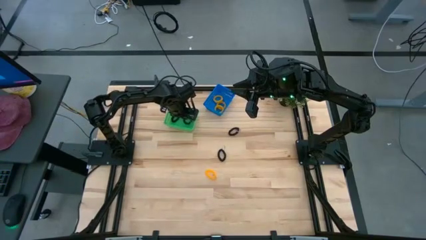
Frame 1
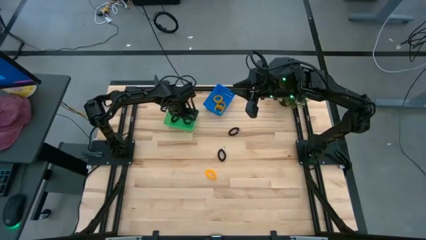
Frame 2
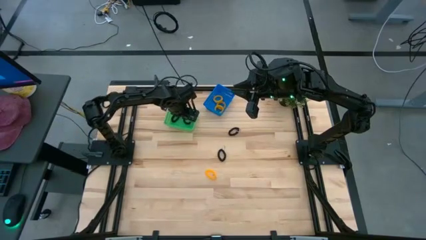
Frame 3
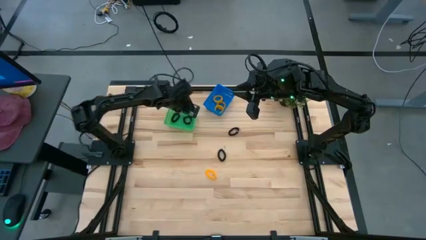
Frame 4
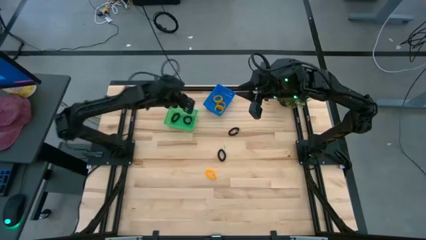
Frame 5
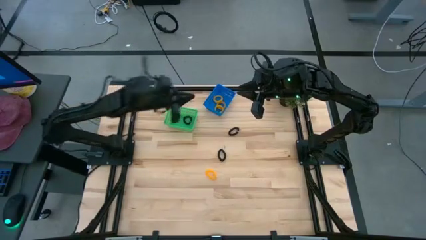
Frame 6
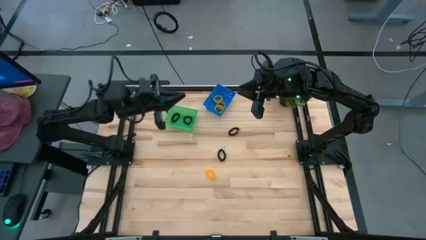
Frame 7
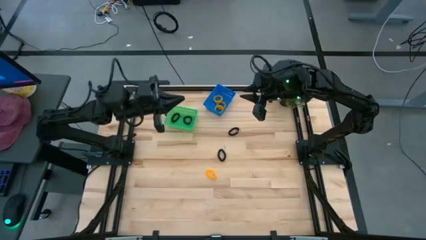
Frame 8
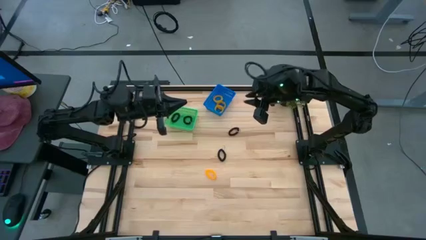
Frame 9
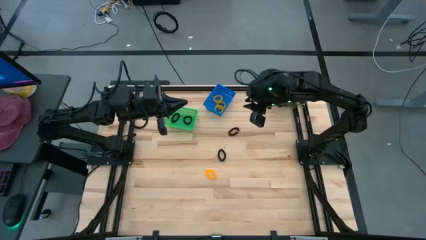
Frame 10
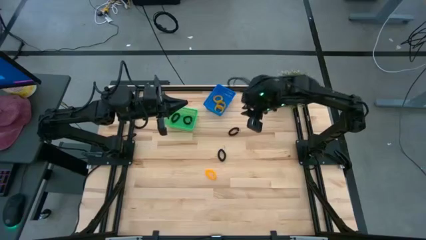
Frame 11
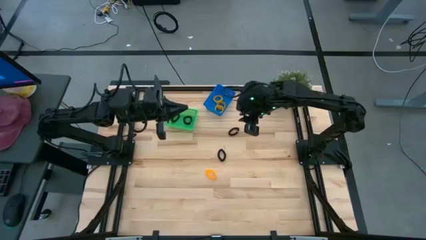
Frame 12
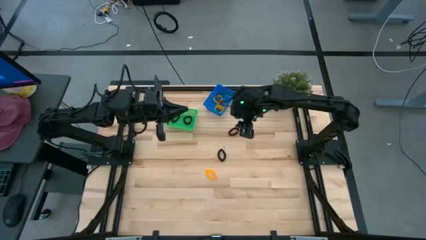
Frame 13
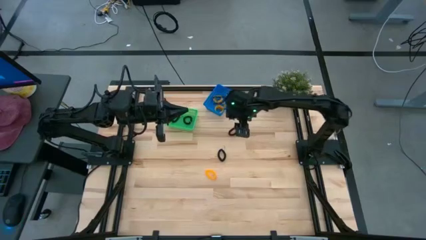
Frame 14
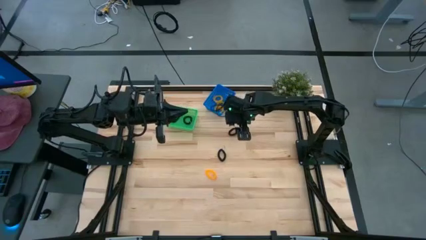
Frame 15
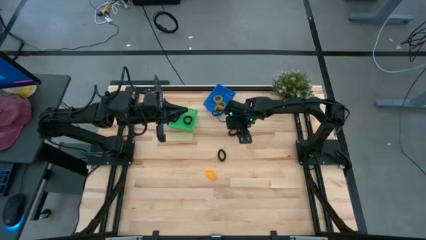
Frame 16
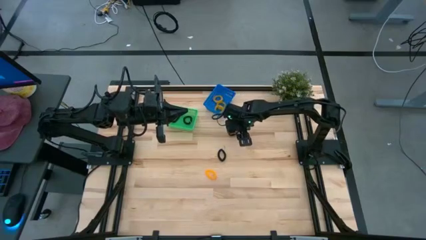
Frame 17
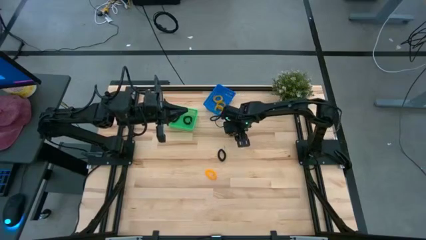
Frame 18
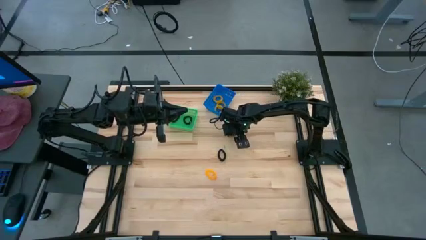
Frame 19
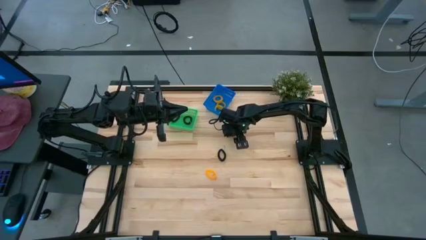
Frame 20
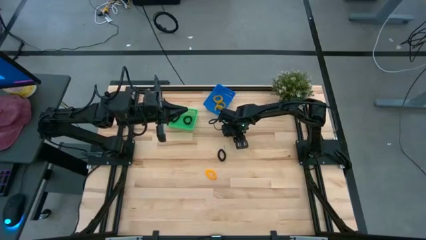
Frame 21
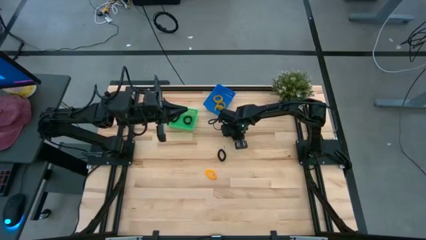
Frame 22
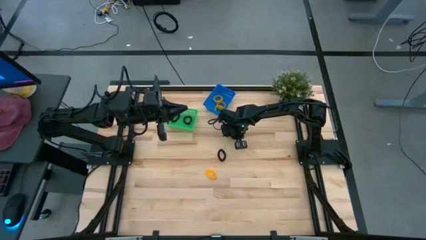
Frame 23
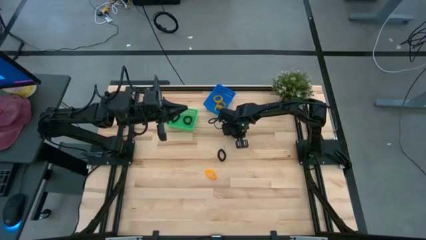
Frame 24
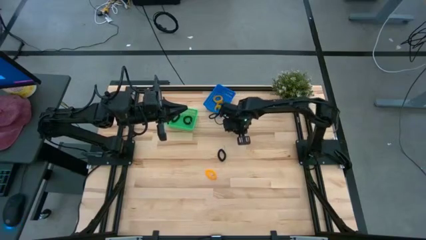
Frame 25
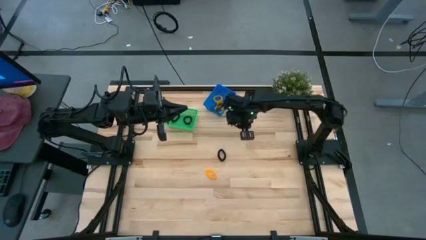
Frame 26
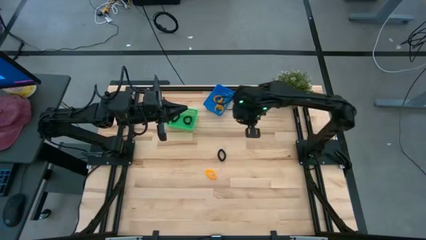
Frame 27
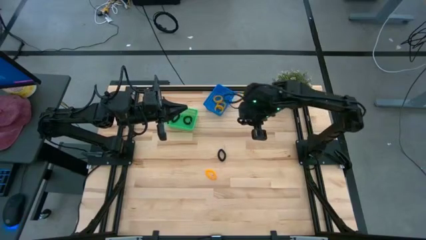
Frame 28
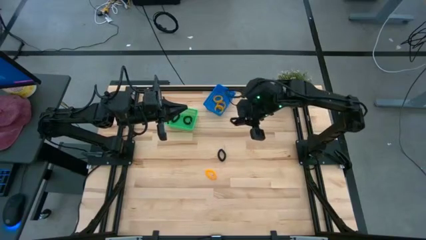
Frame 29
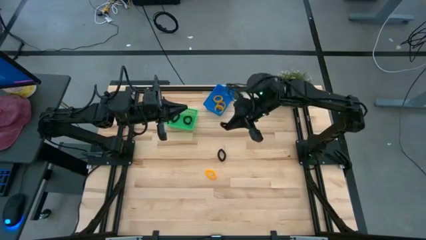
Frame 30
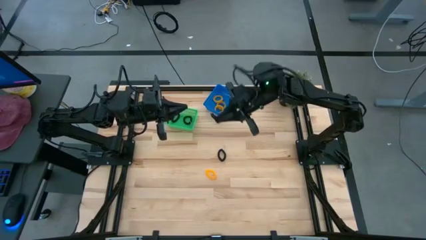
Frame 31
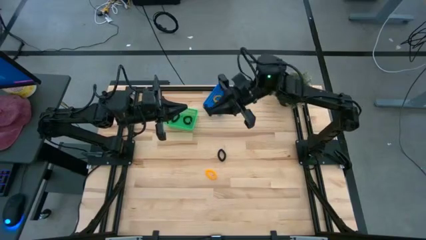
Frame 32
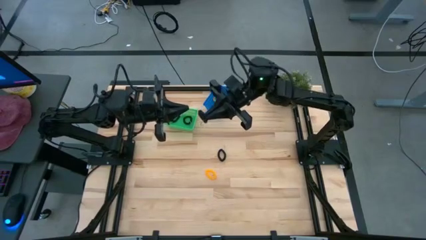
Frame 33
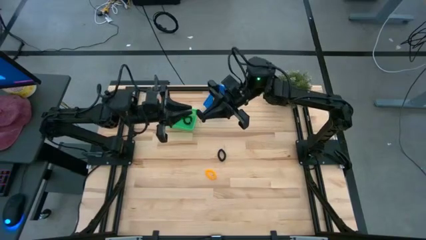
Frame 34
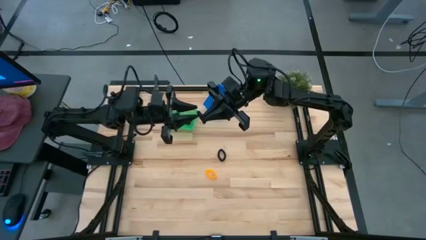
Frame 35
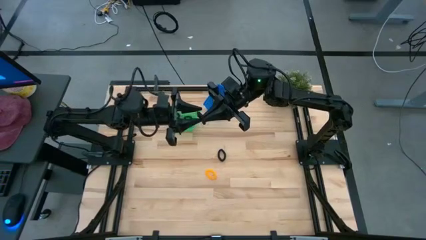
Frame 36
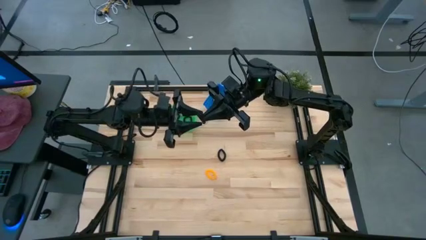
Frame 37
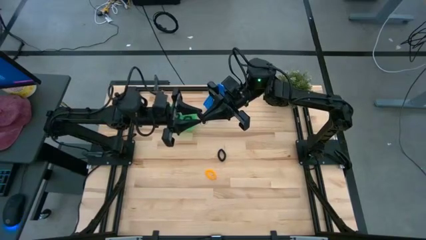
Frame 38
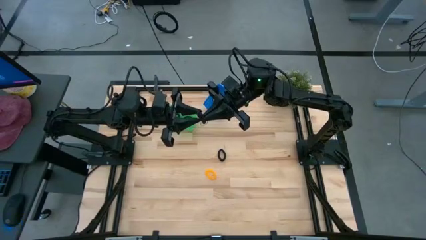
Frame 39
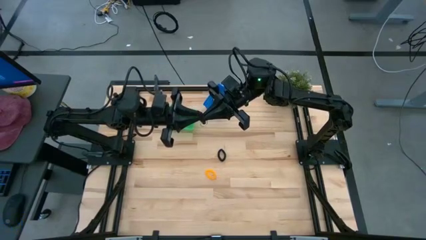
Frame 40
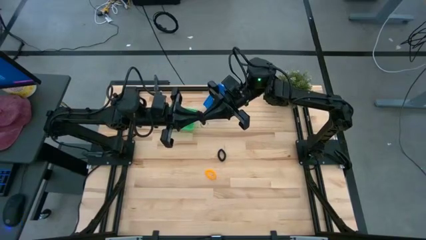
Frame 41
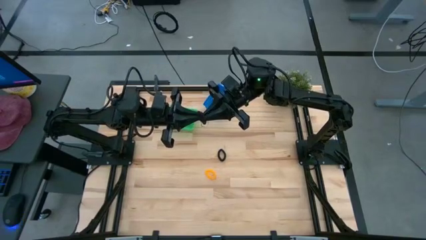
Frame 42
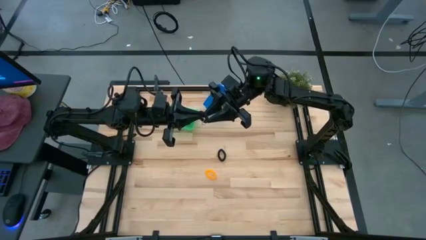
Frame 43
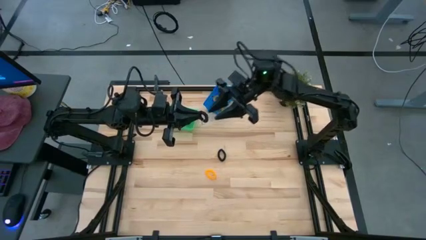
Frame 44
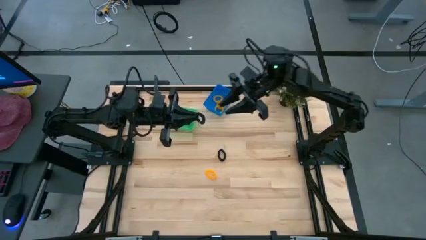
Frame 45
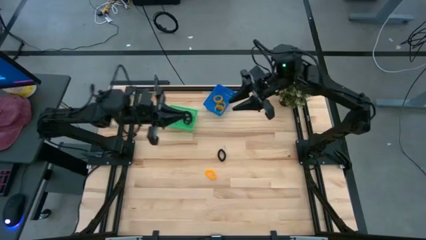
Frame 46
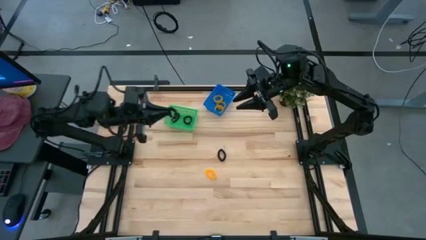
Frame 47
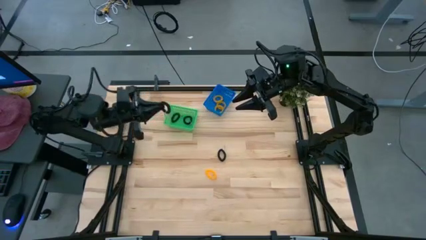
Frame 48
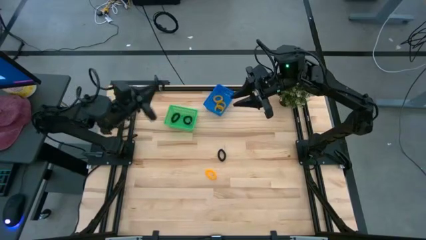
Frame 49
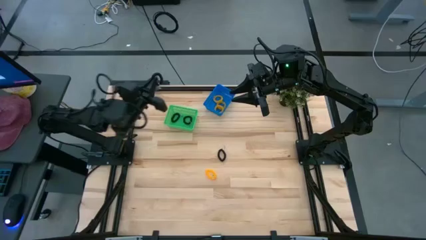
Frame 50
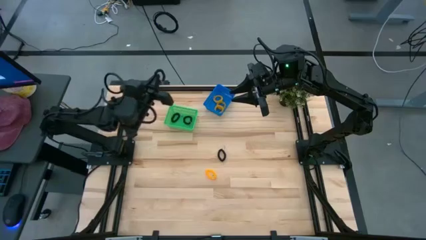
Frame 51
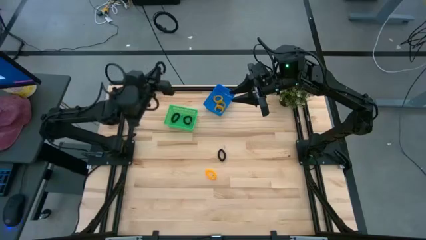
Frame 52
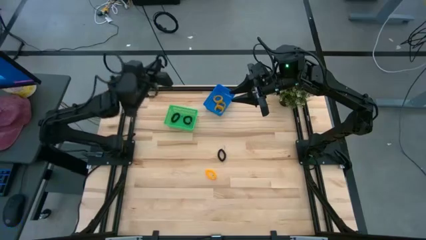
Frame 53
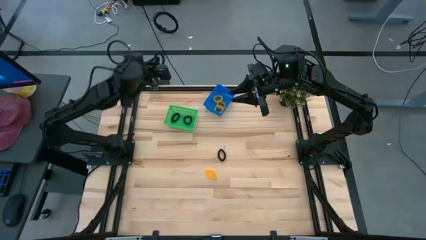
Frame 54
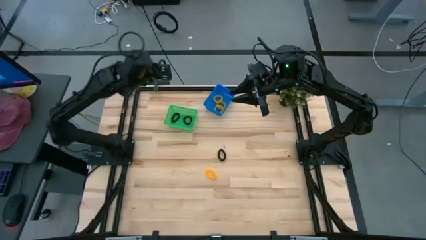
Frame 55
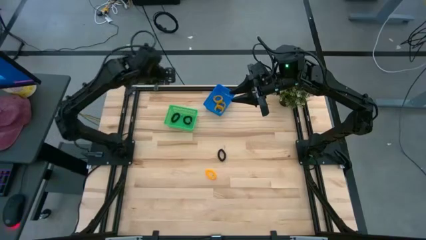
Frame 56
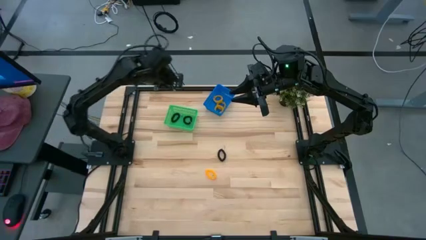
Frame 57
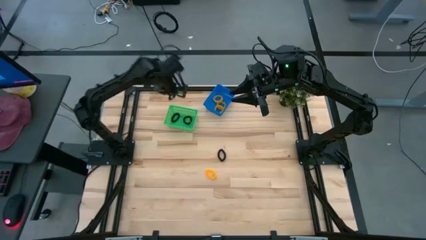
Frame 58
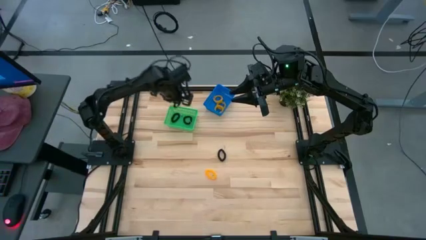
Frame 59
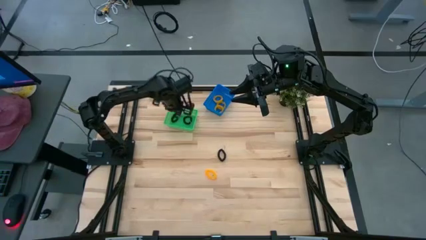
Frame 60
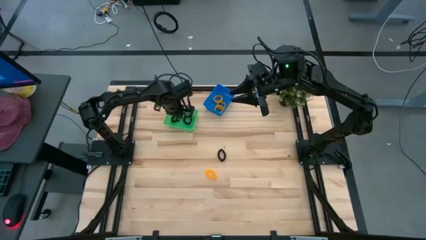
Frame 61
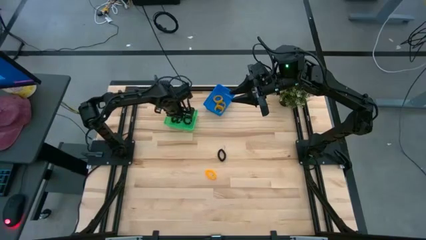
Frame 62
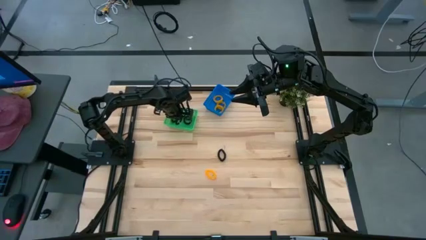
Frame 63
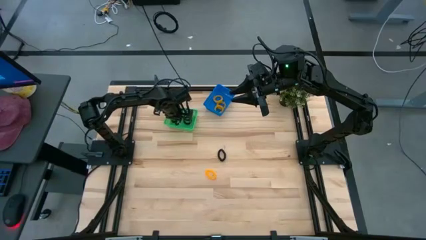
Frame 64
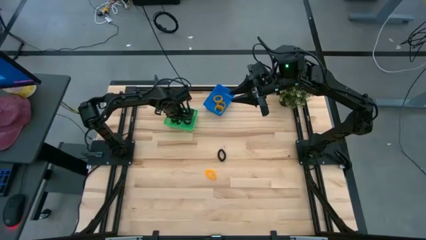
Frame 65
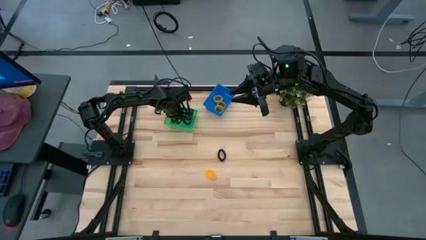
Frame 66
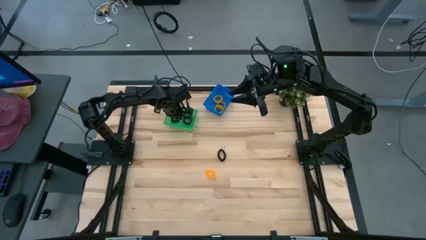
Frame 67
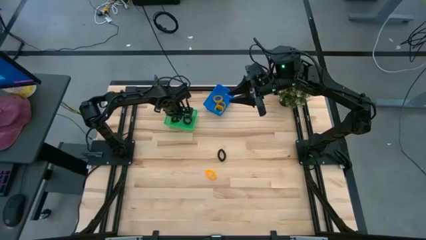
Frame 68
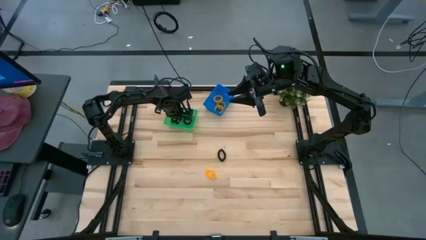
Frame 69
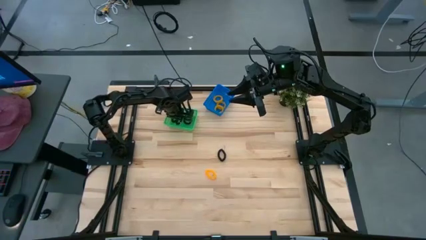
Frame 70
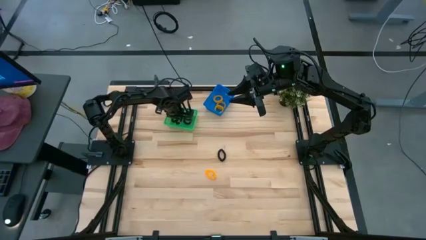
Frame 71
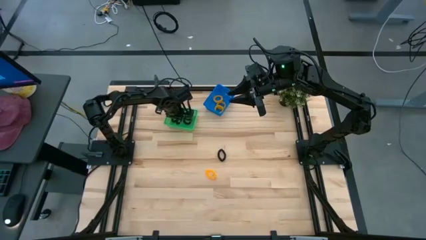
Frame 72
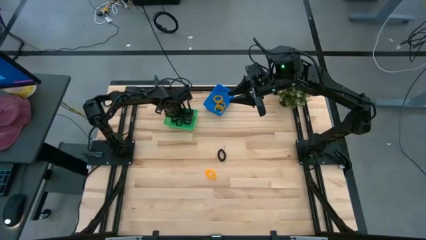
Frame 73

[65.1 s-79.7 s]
Task: Sort spring keychains into baskets
Put the black spring keychain into the green basket
